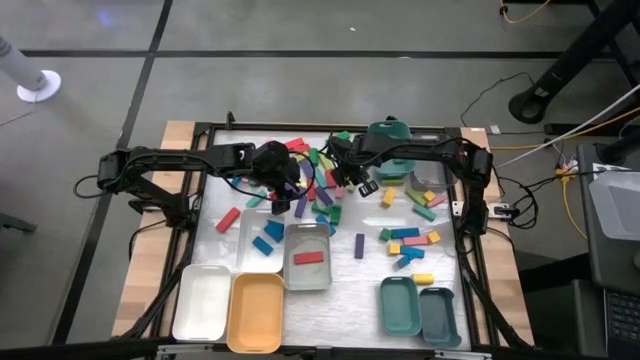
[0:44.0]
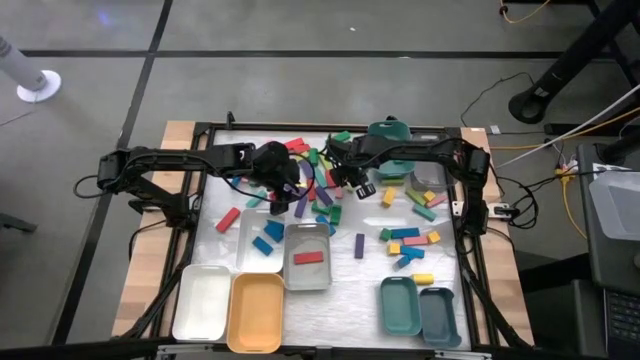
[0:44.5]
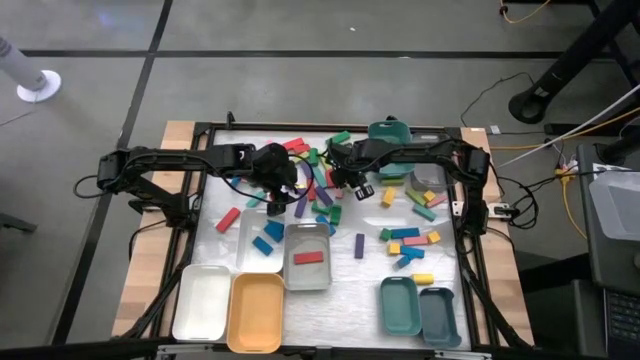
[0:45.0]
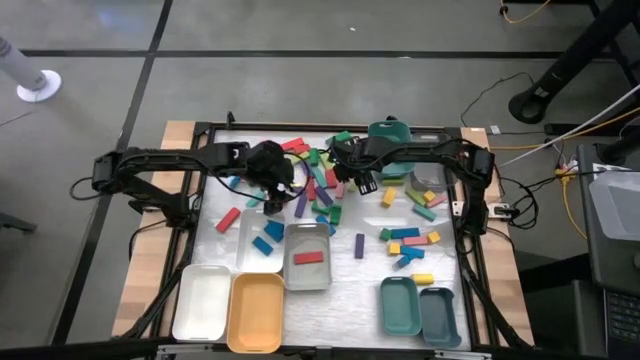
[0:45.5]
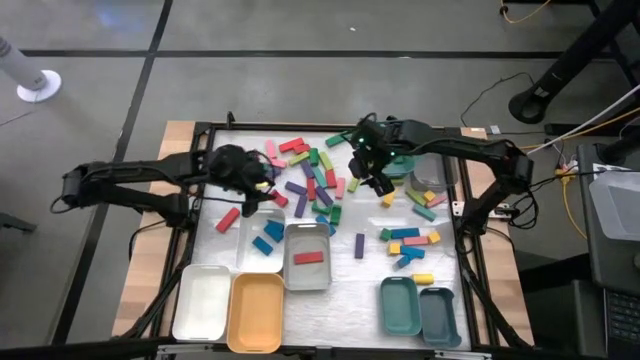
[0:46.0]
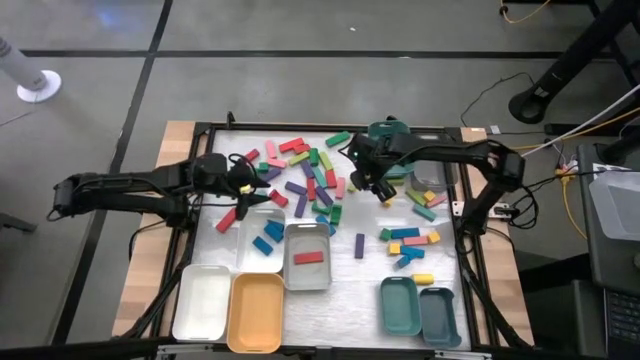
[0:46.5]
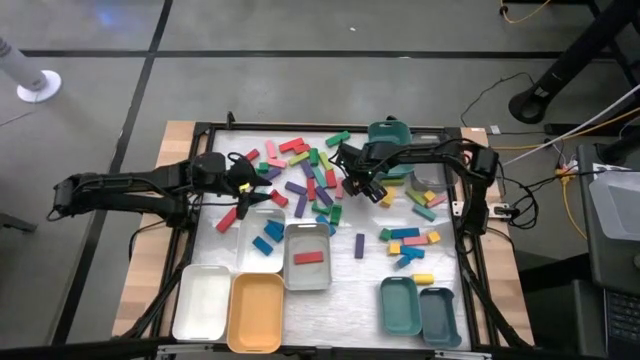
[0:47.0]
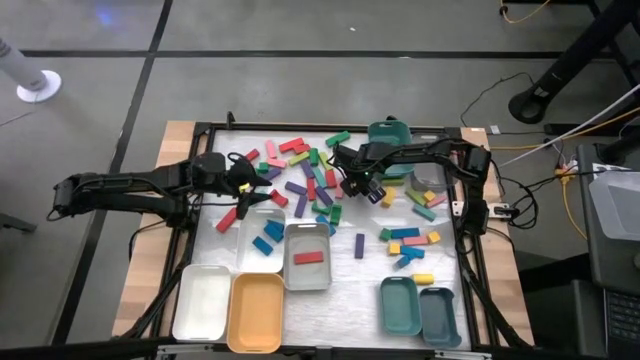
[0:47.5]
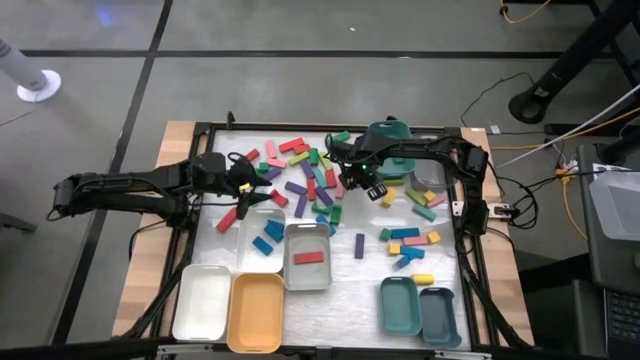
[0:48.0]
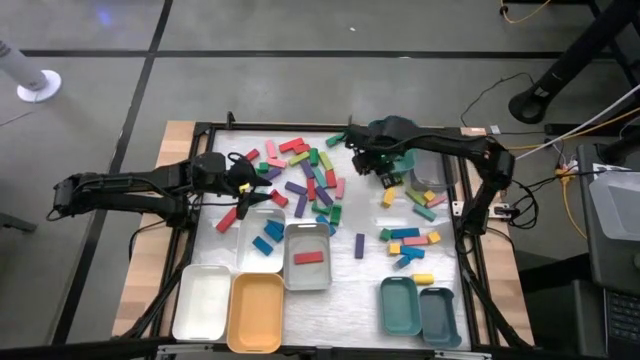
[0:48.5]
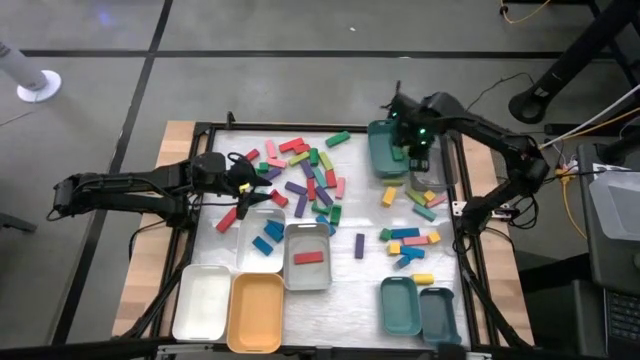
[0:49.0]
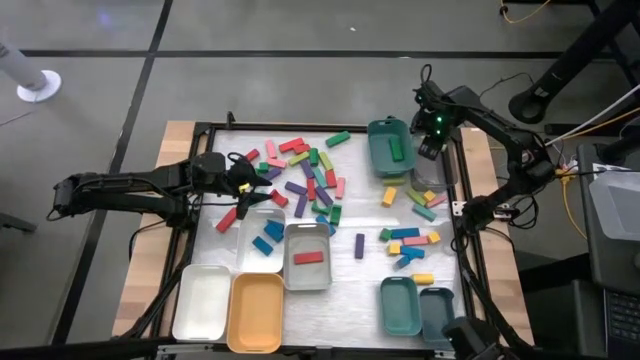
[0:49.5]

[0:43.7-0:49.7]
Task: Sort blocks
Put the light green block into the black bin

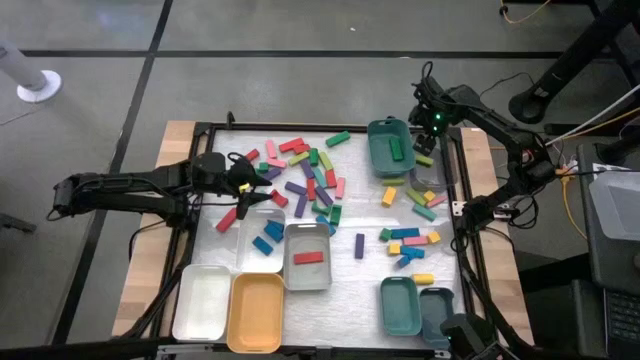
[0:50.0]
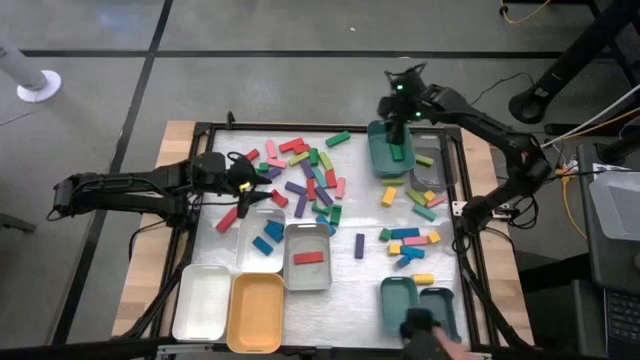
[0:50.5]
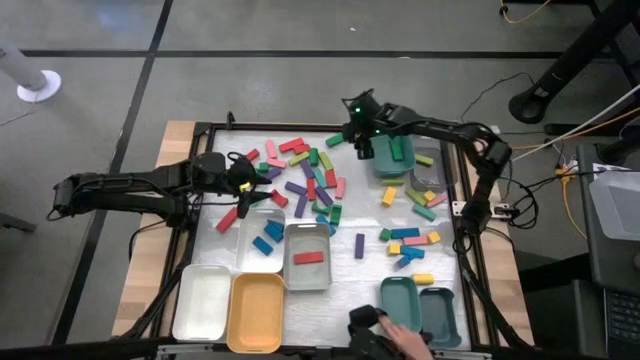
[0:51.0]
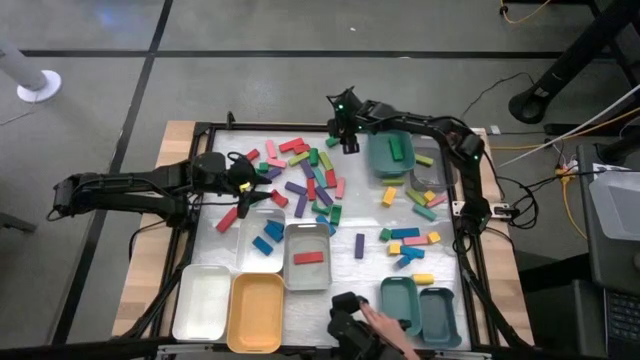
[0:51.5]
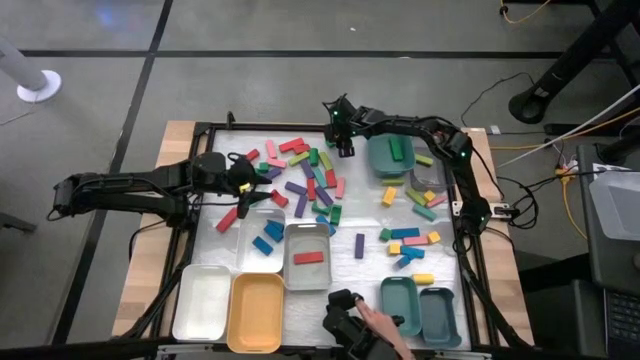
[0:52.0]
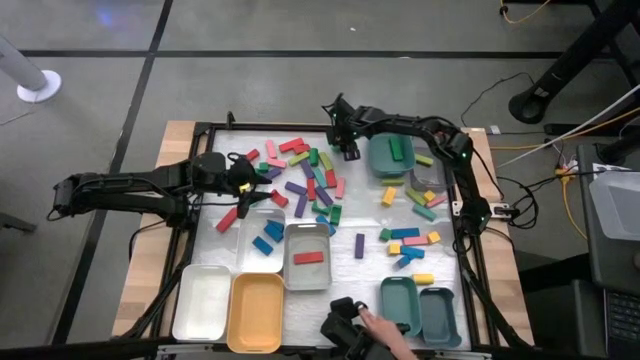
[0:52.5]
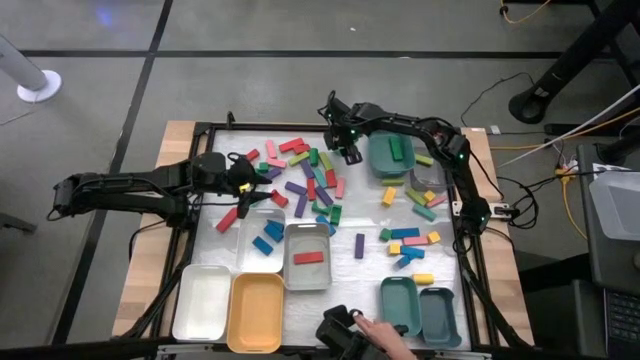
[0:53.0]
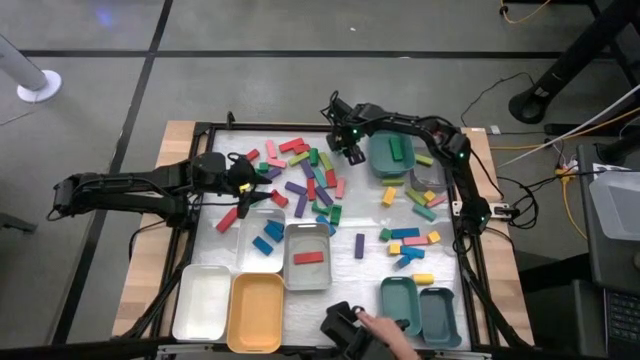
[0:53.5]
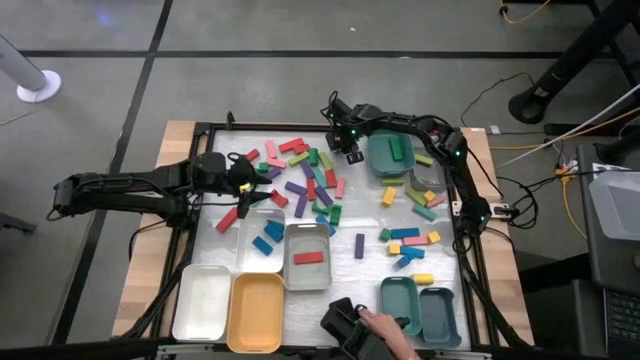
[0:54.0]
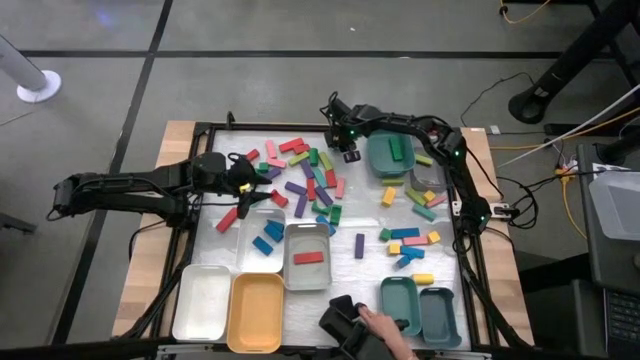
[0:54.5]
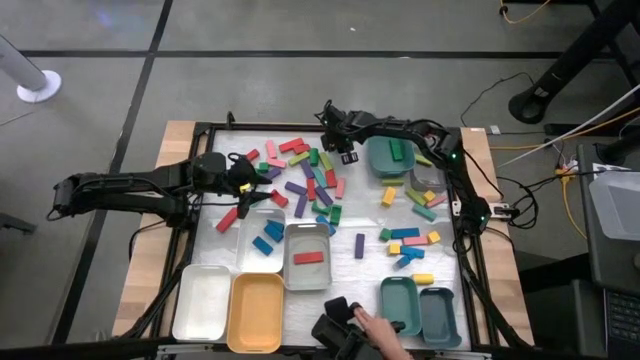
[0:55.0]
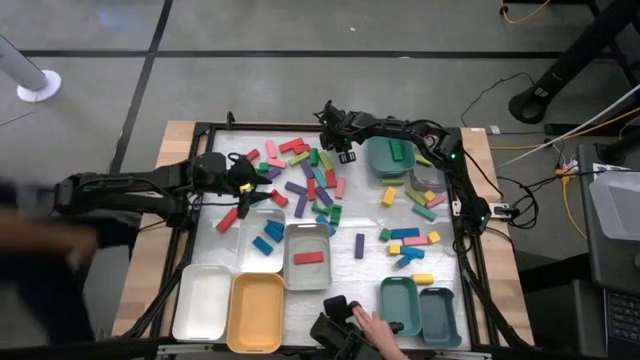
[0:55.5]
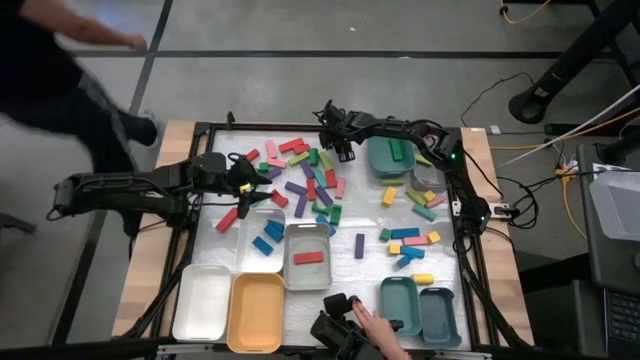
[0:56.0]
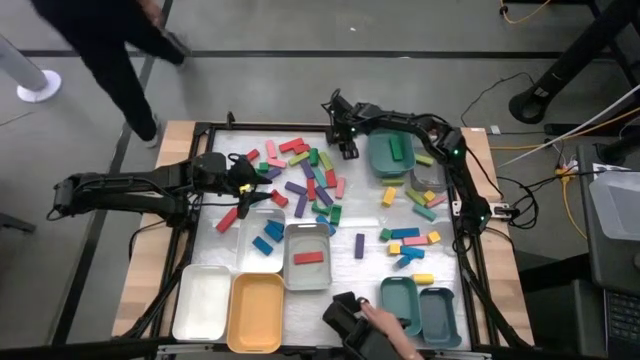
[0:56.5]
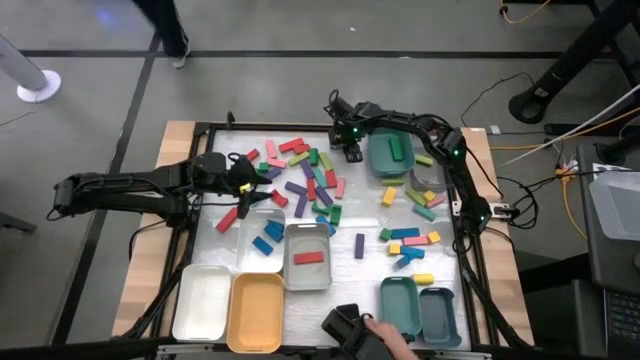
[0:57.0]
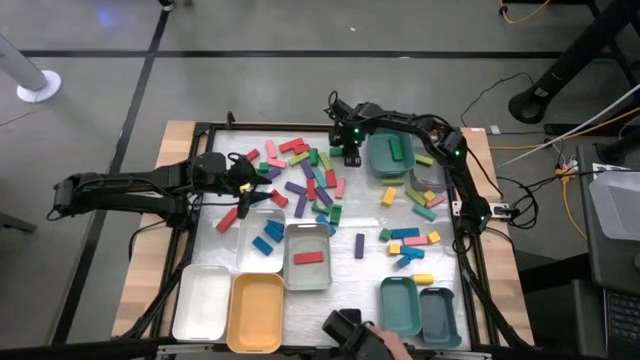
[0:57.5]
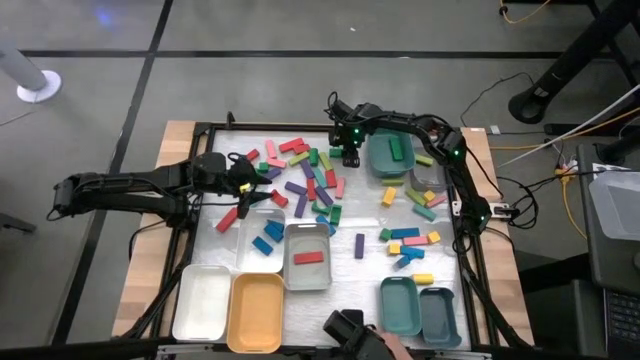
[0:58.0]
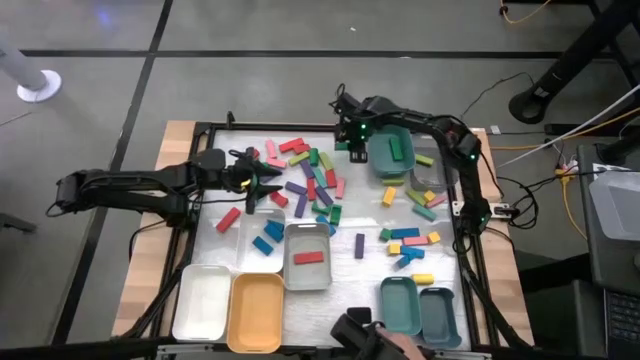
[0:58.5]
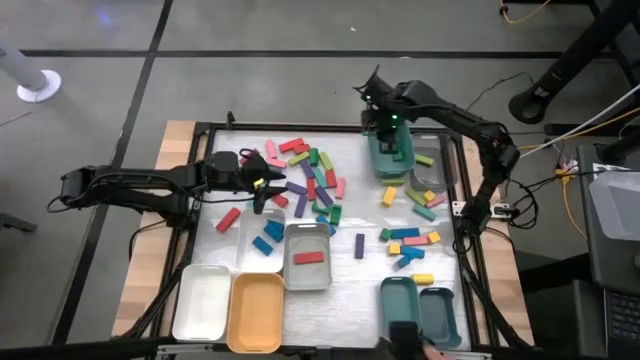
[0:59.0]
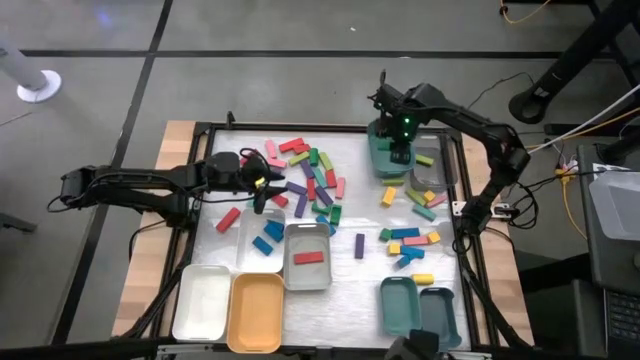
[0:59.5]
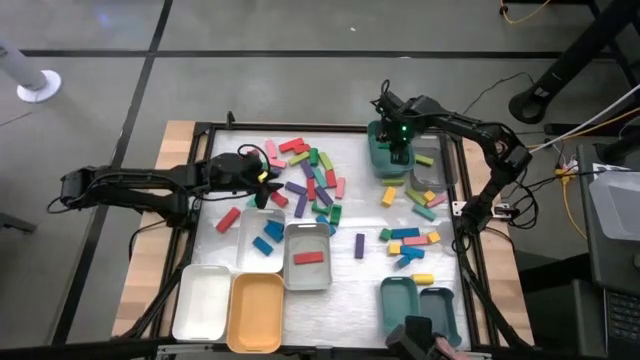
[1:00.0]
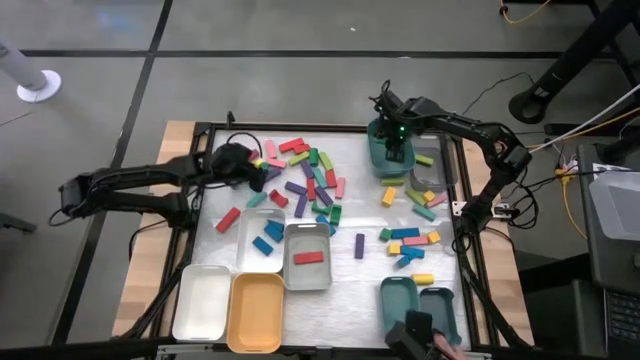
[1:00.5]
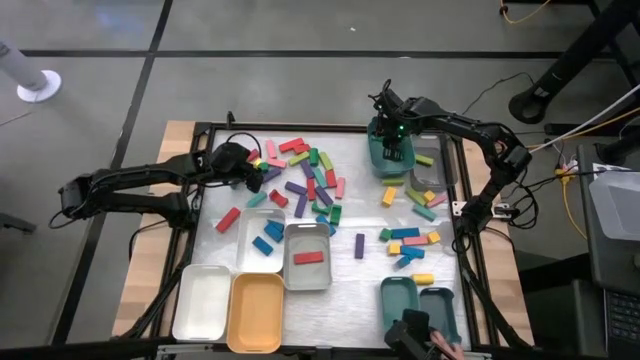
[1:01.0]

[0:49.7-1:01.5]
Put the green block into the top green bin

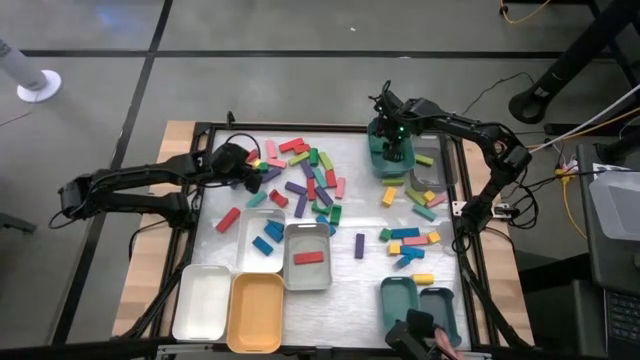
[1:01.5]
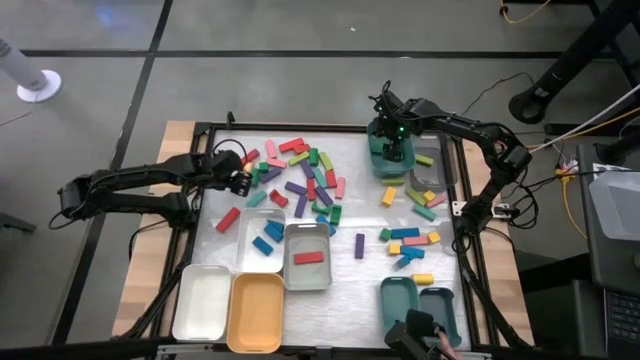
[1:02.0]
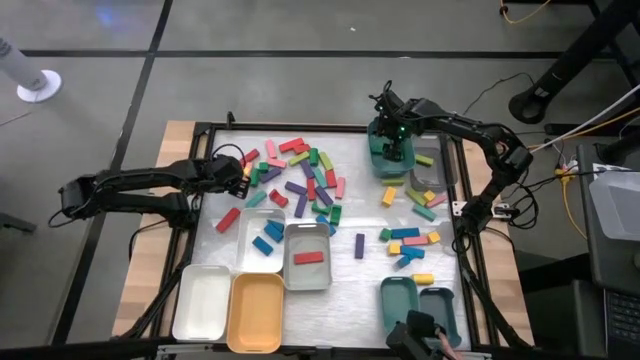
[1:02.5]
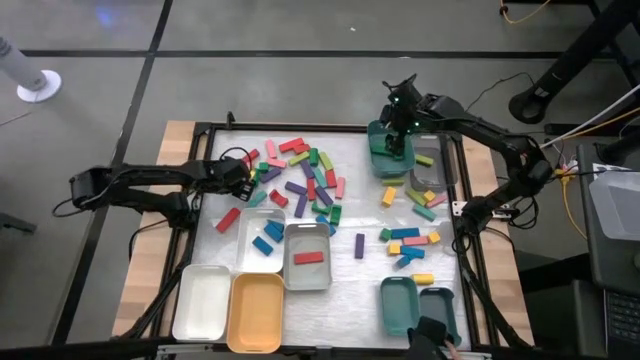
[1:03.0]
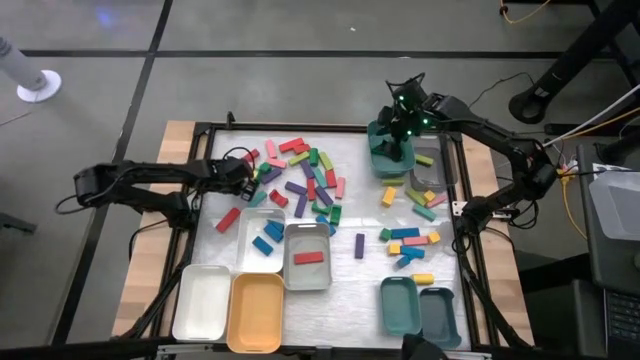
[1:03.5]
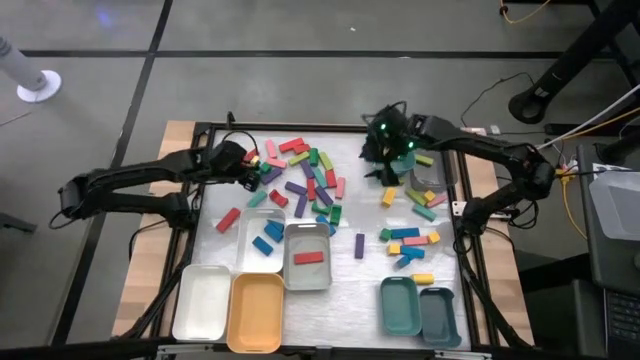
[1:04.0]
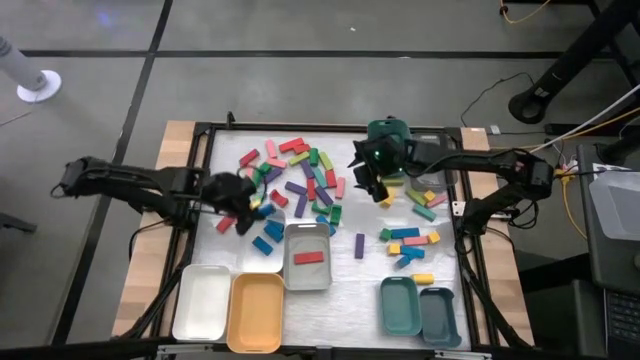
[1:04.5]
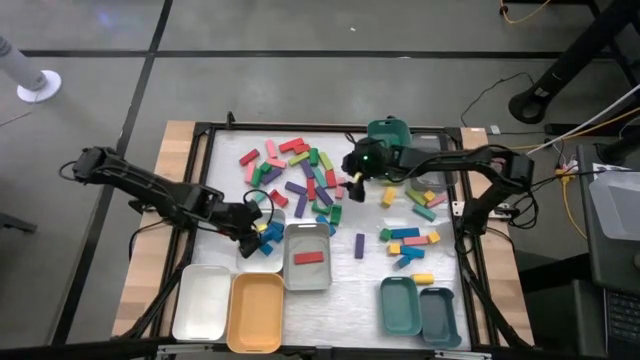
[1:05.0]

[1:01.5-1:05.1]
Put the blue block into the top white bin
